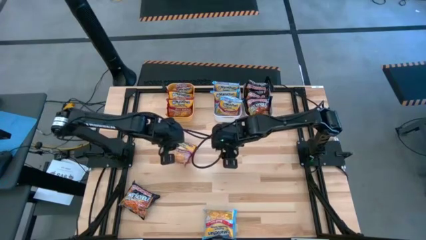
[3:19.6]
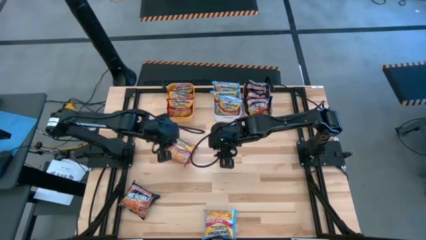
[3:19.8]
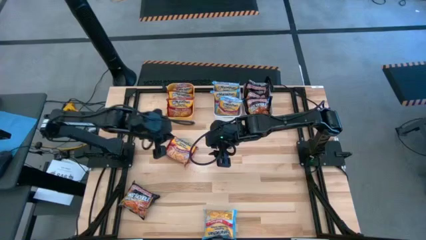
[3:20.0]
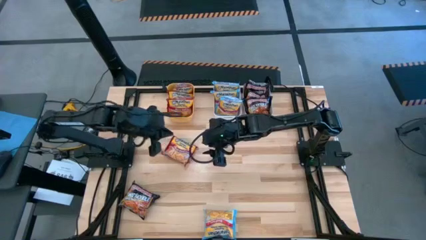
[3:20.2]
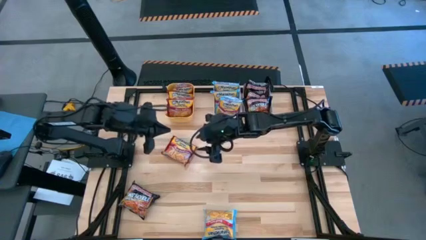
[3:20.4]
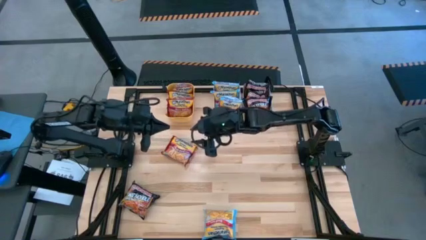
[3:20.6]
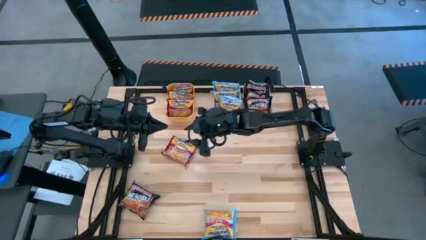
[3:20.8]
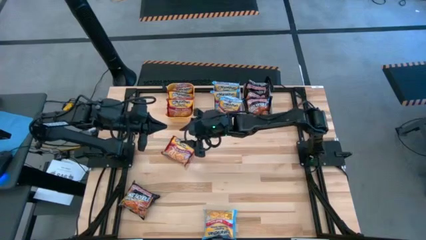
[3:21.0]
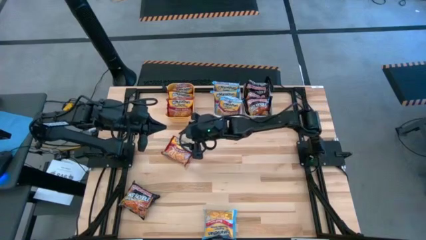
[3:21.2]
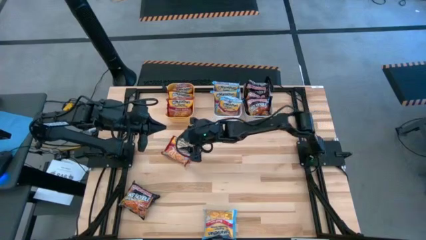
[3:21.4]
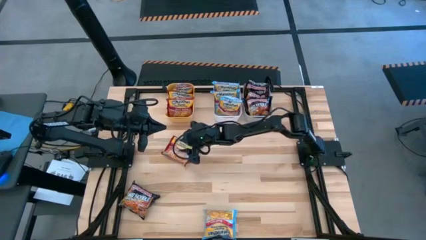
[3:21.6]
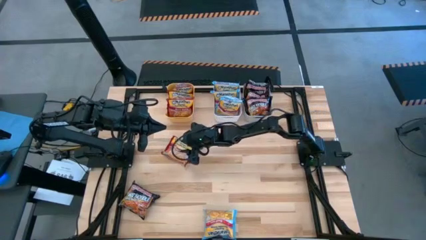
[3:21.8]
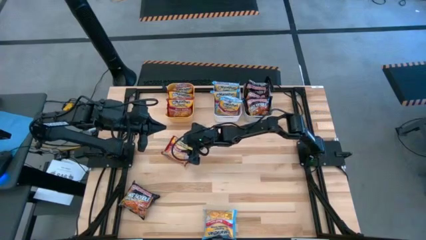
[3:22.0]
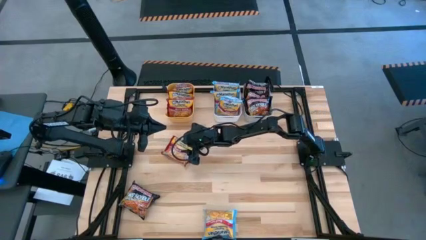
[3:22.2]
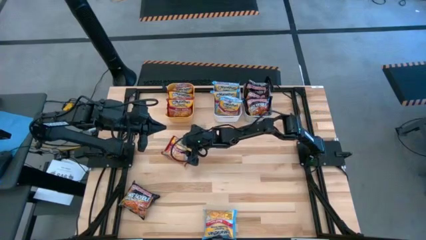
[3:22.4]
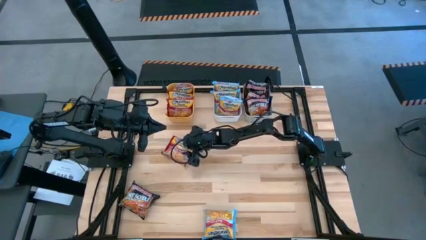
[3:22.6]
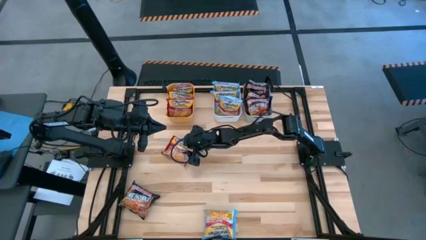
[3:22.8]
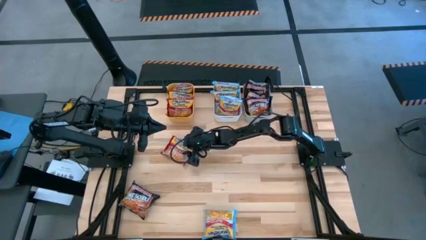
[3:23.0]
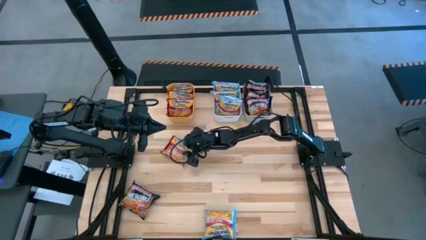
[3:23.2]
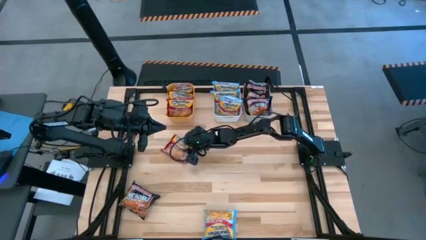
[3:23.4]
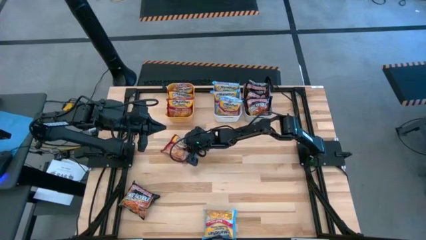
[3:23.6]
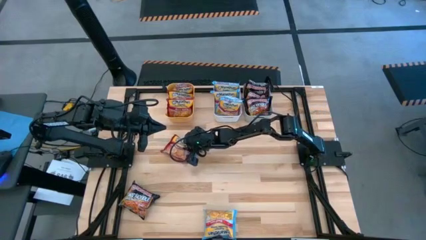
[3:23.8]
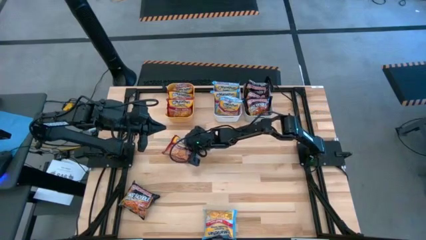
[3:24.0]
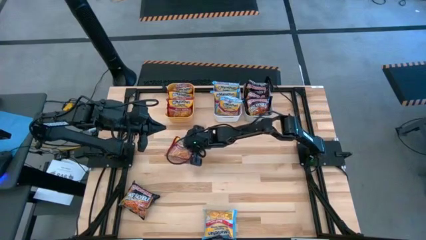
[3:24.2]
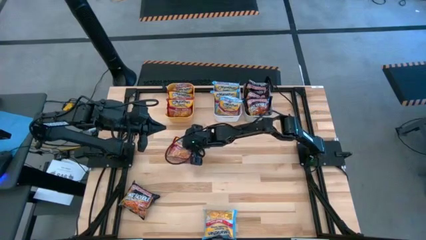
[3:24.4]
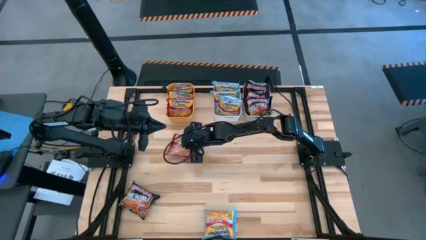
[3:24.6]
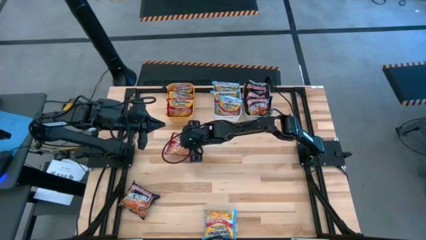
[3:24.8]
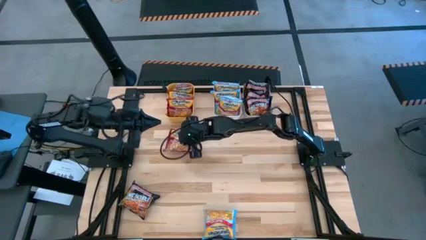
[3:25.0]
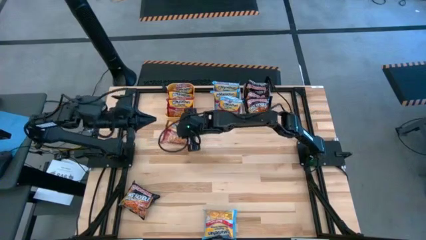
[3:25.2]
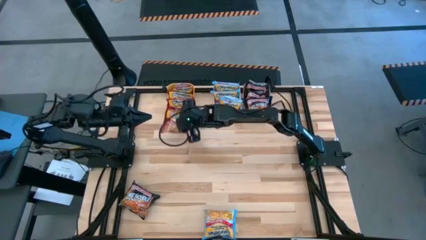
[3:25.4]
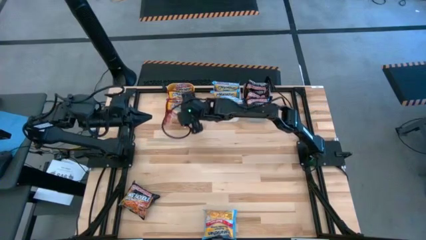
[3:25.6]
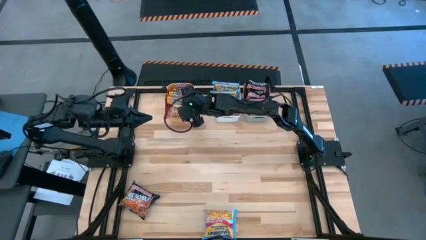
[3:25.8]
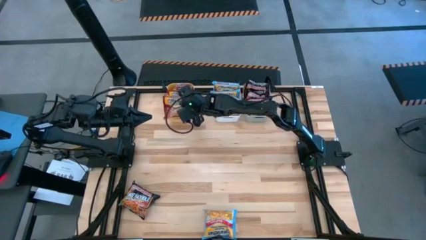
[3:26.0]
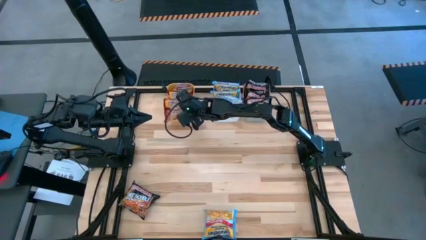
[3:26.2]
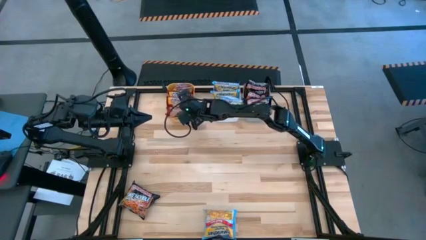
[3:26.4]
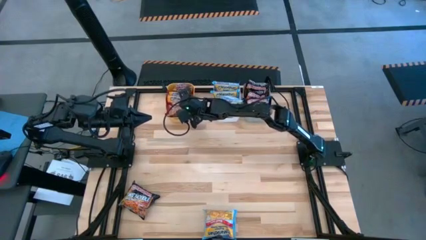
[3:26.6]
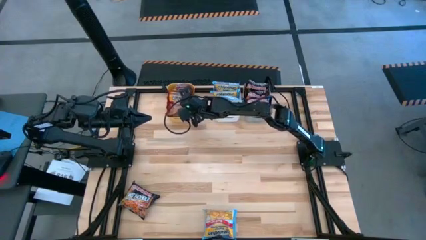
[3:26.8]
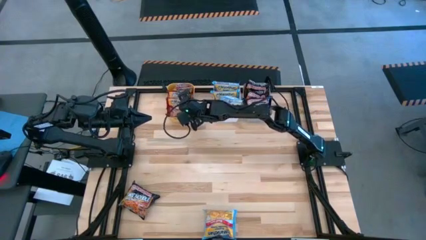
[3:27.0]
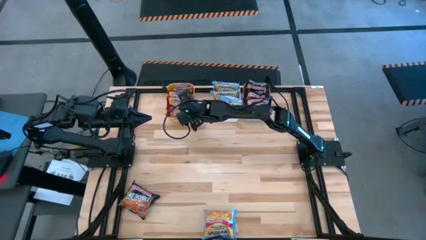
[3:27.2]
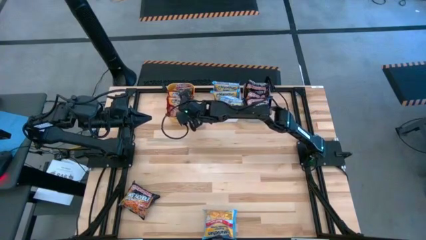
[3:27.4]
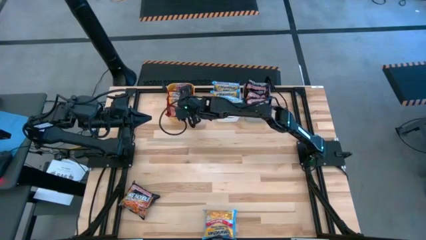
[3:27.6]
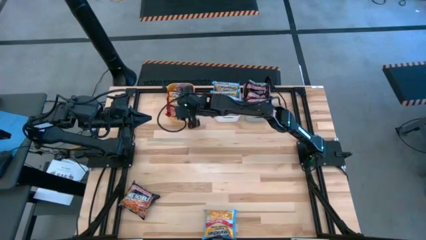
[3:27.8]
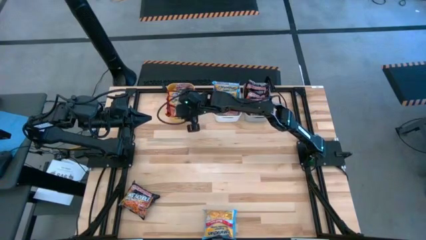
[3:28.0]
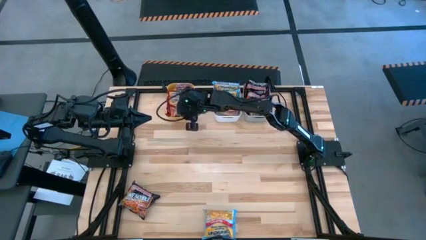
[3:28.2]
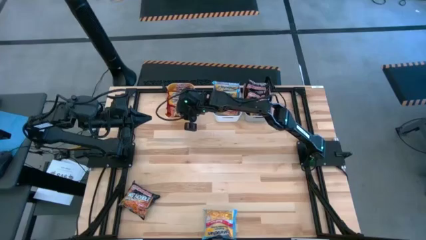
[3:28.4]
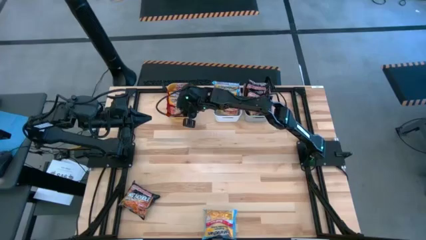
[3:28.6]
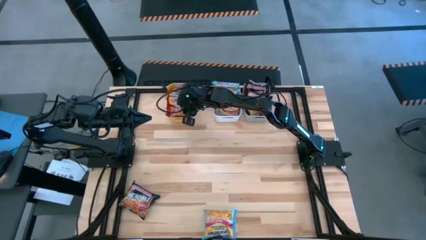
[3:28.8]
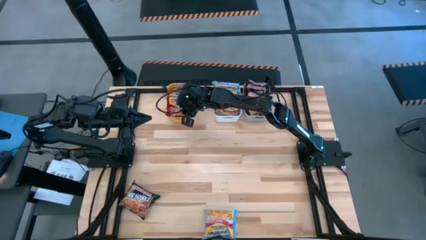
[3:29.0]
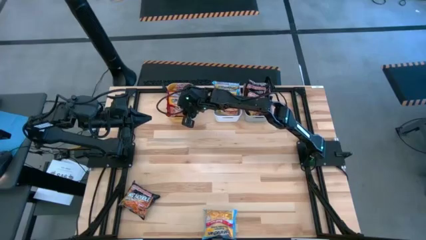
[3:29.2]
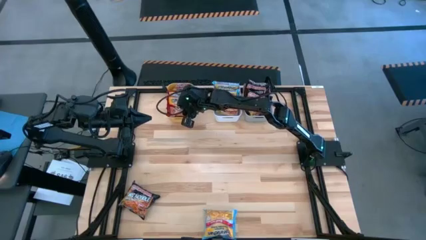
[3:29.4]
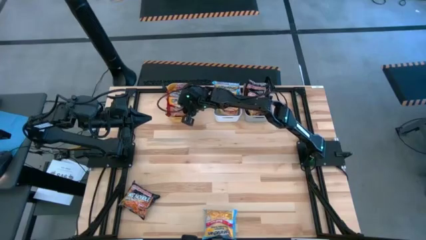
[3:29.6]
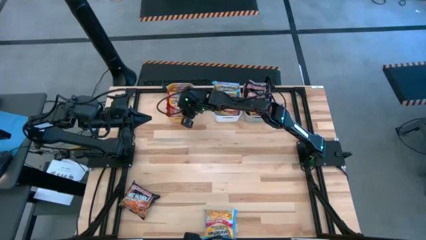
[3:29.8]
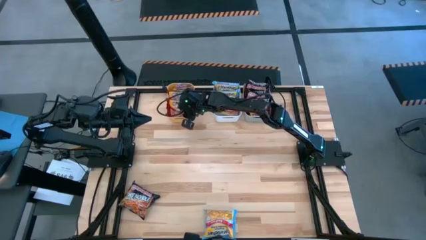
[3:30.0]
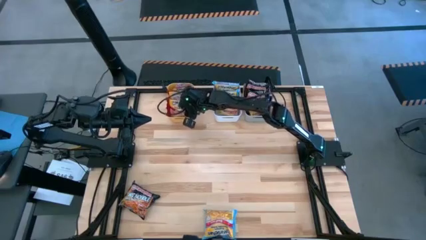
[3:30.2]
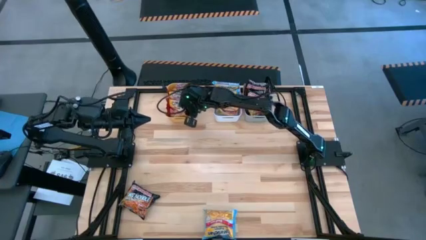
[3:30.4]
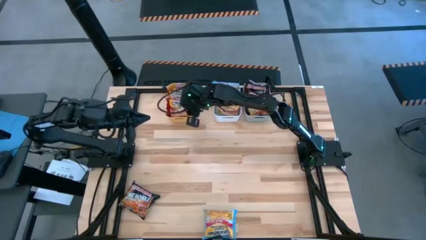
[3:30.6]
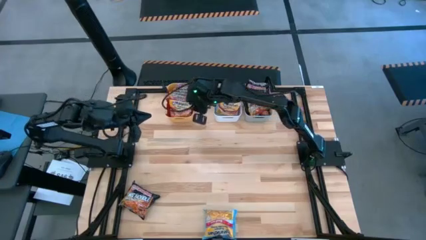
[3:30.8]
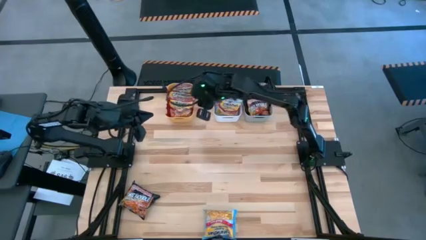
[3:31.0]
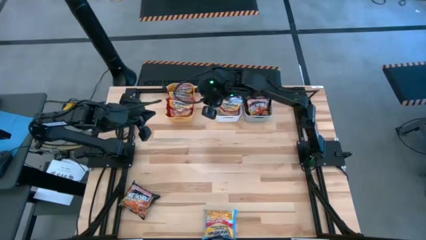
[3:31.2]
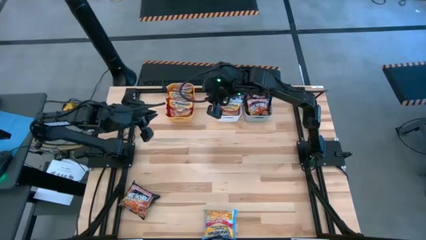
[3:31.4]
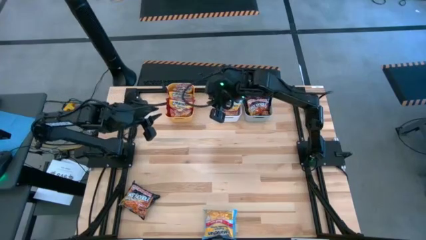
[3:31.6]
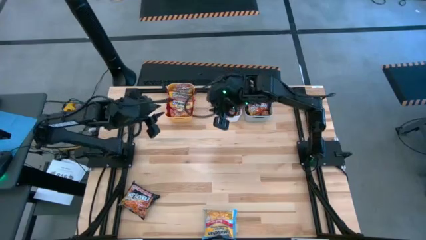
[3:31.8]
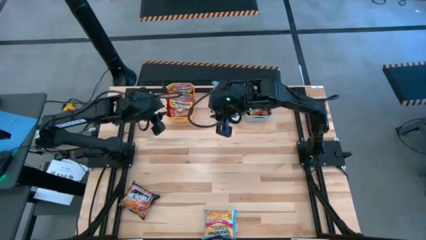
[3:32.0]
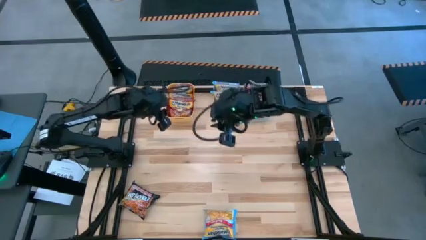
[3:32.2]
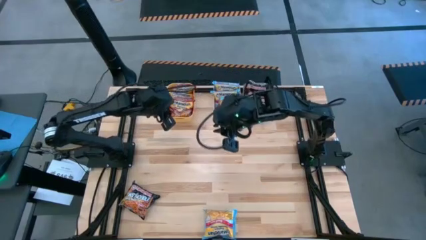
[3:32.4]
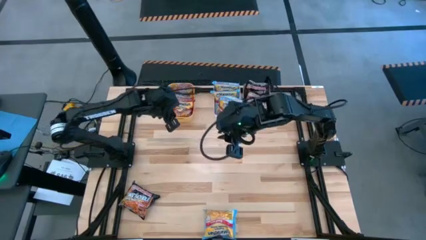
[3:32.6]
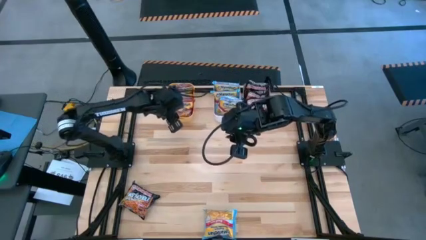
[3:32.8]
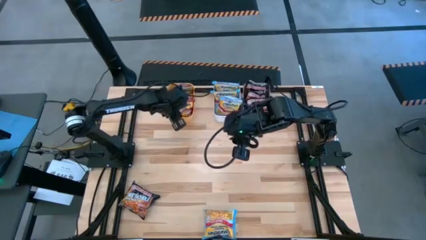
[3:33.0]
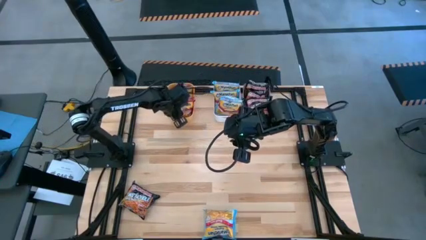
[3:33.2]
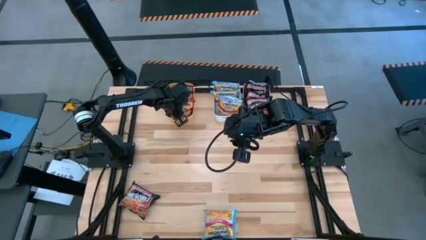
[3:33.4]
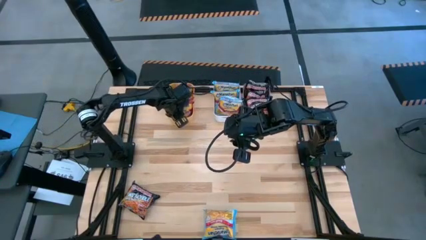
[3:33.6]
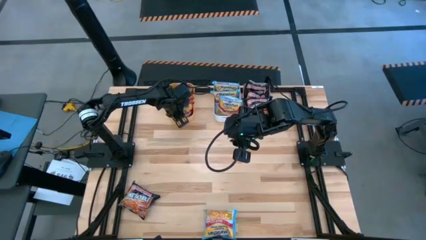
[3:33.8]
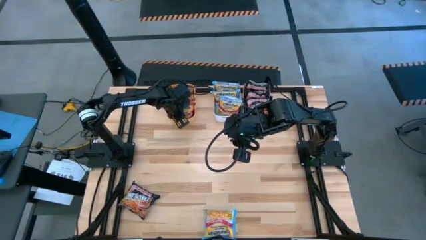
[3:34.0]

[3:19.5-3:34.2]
Task: Sort Maruchan noodles
Put the red noodle pack into the yellow bin

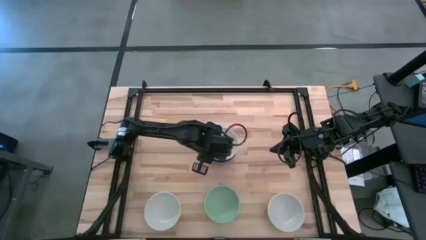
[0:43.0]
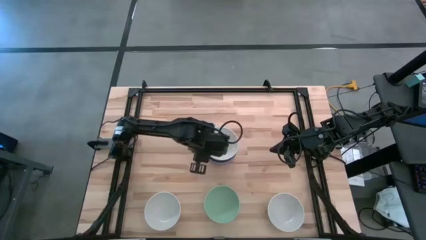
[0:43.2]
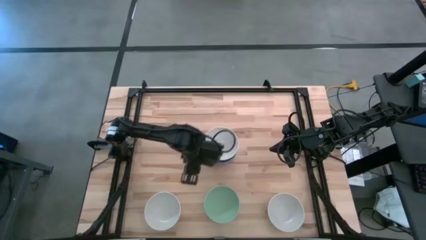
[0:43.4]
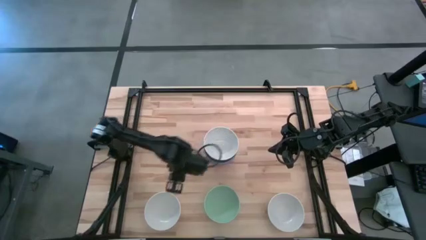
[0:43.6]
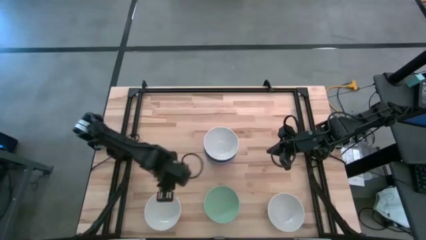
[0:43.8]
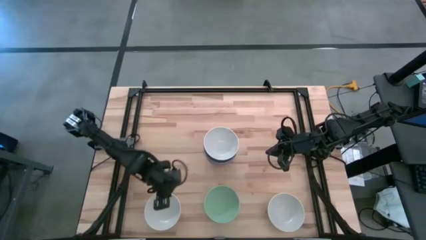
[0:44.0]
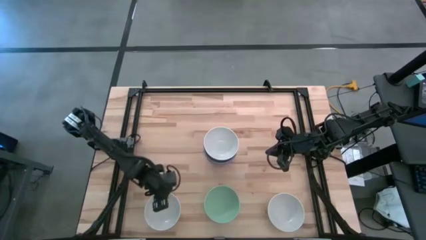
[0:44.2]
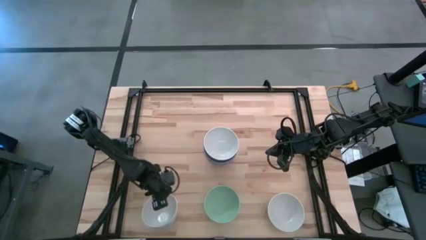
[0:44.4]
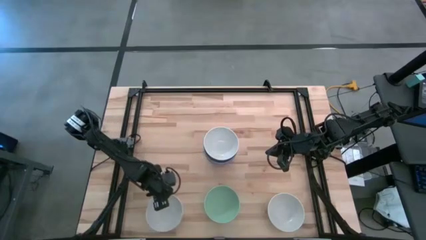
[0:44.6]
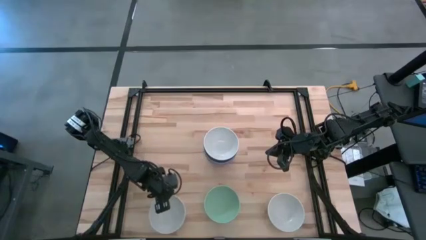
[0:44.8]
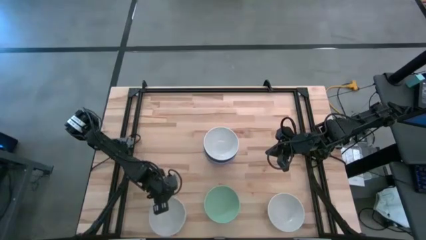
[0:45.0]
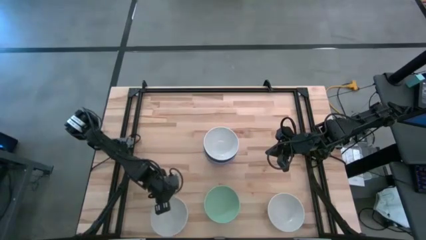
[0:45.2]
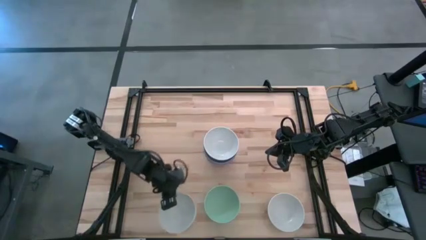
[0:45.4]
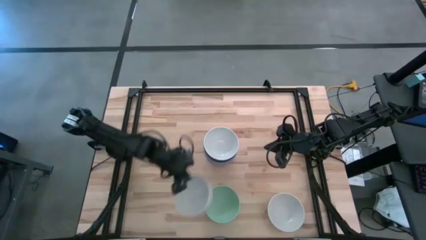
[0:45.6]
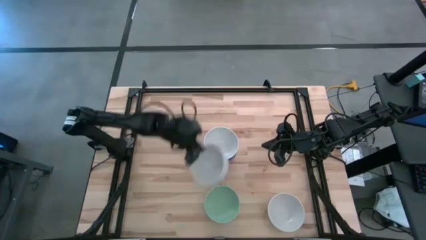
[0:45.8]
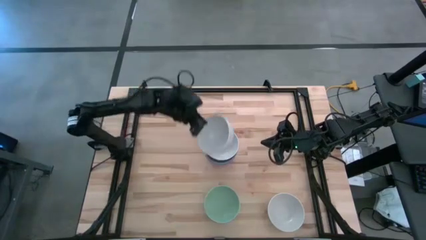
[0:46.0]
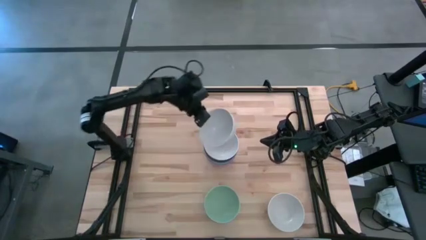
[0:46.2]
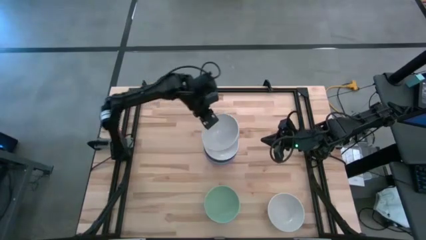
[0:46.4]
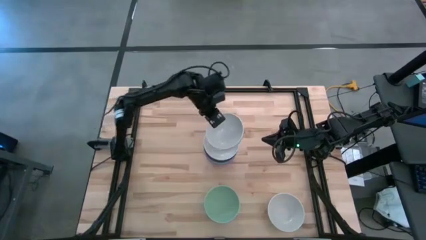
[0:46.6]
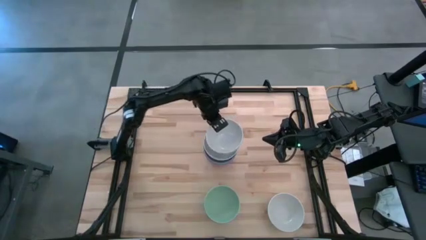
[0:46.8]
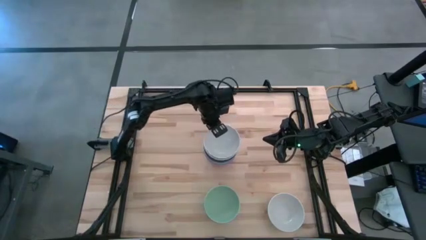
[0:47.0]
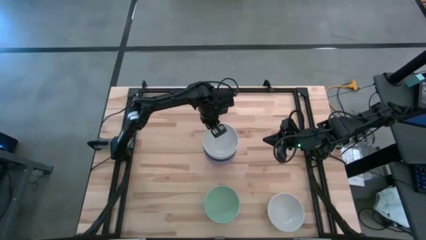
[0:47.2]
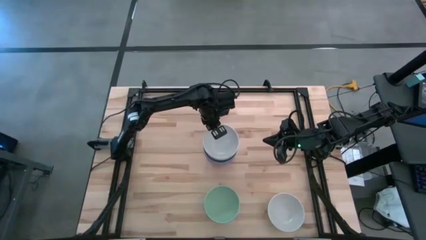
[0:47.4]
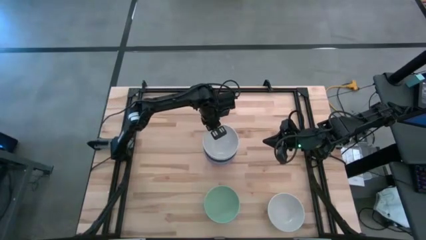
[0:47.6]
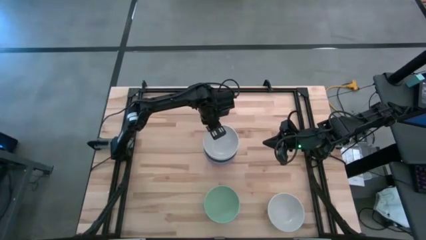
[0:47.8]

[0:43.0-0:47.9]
Task: Nest bowls inside each other
Stack the left white bowl into the white bowl
